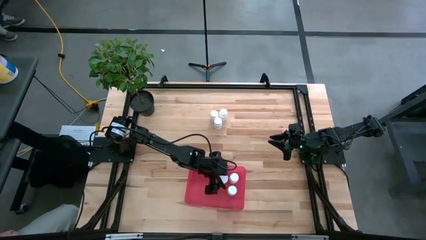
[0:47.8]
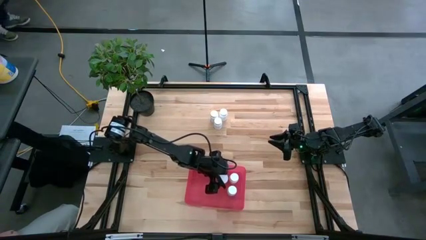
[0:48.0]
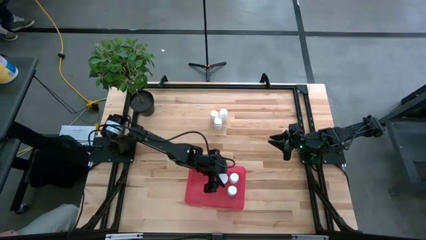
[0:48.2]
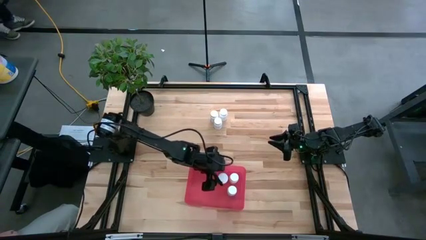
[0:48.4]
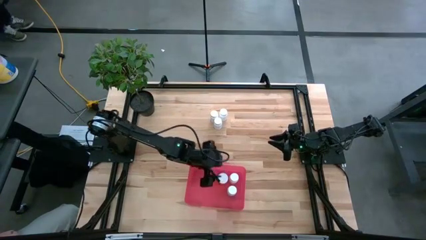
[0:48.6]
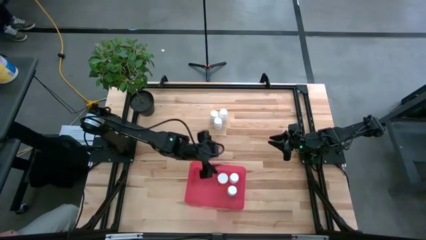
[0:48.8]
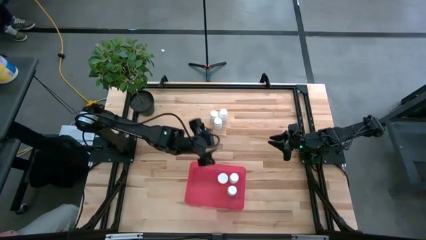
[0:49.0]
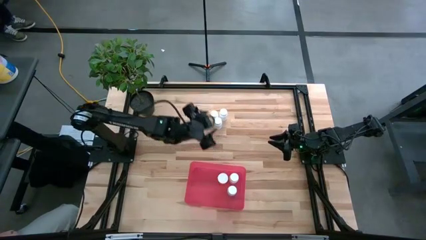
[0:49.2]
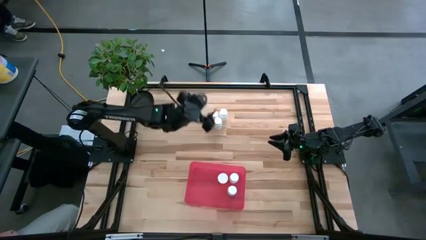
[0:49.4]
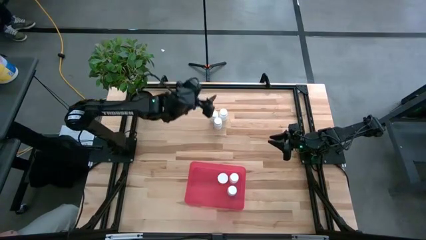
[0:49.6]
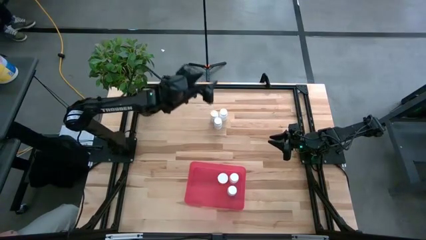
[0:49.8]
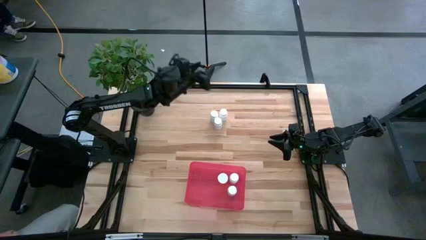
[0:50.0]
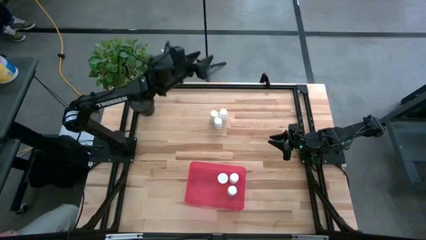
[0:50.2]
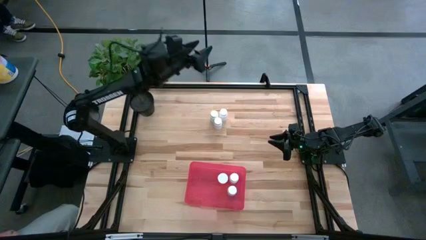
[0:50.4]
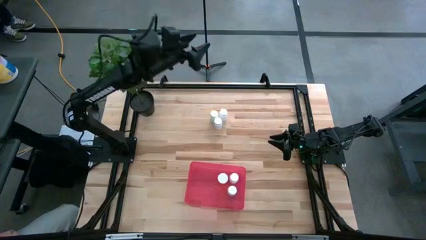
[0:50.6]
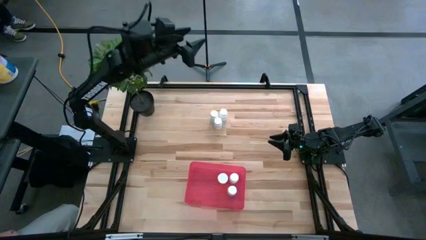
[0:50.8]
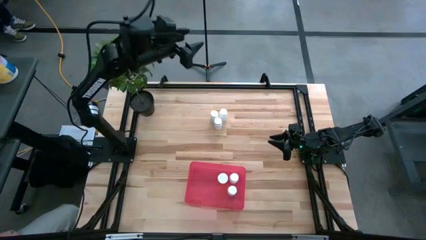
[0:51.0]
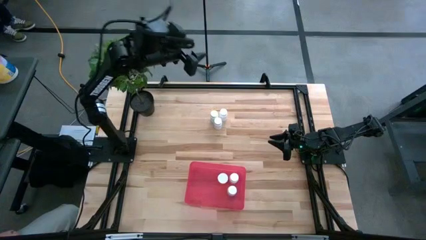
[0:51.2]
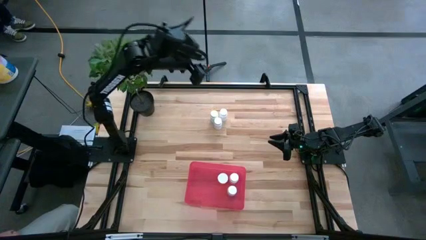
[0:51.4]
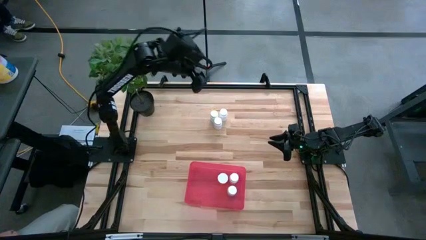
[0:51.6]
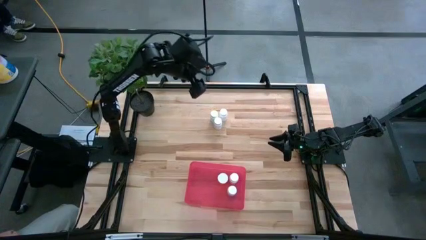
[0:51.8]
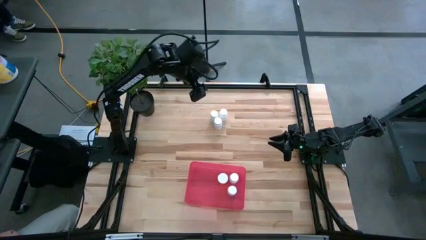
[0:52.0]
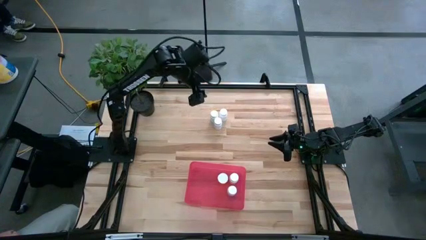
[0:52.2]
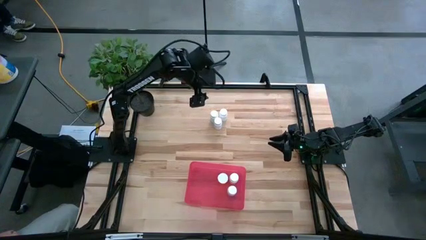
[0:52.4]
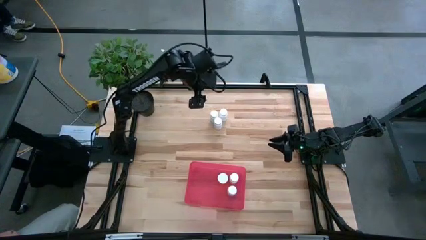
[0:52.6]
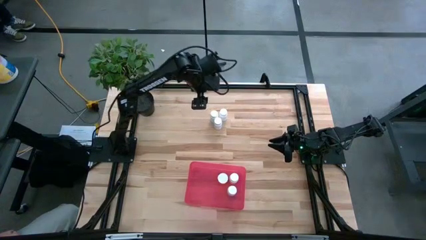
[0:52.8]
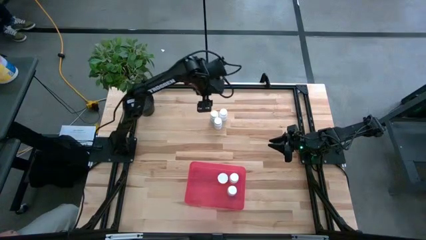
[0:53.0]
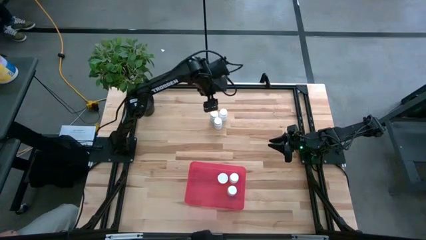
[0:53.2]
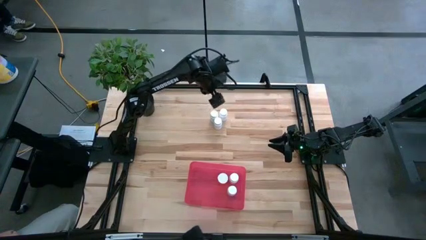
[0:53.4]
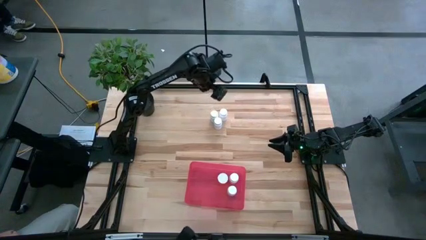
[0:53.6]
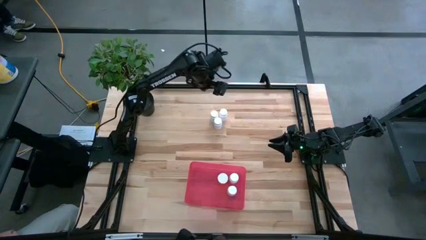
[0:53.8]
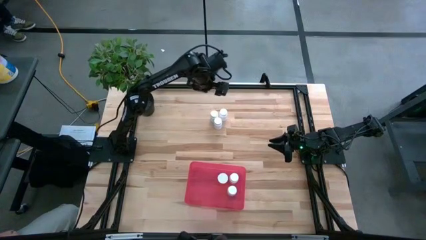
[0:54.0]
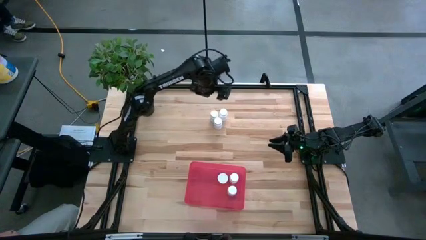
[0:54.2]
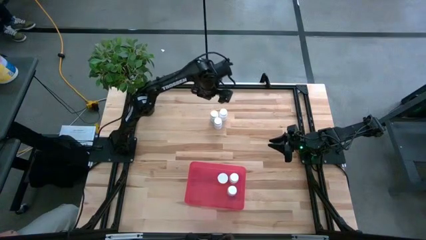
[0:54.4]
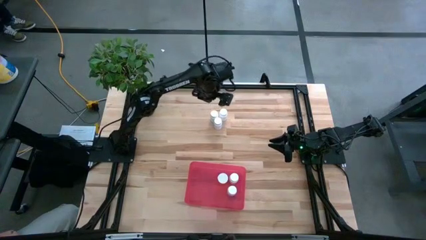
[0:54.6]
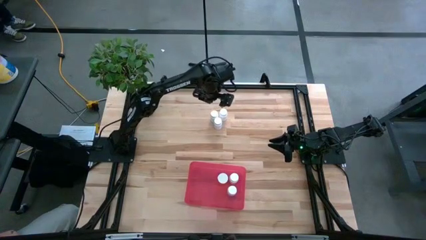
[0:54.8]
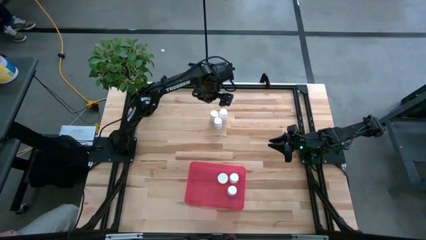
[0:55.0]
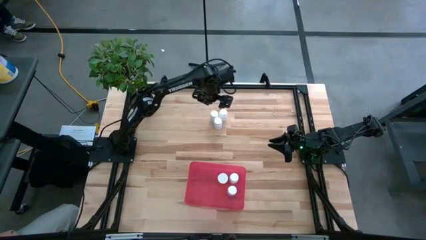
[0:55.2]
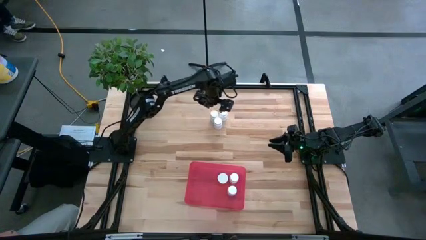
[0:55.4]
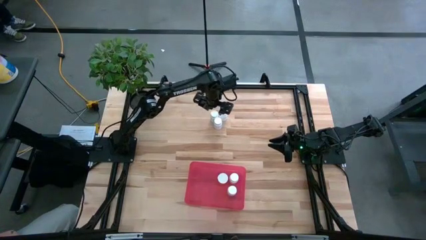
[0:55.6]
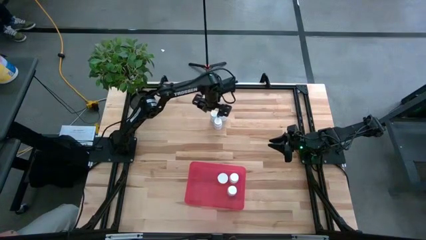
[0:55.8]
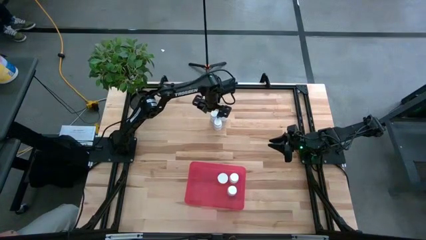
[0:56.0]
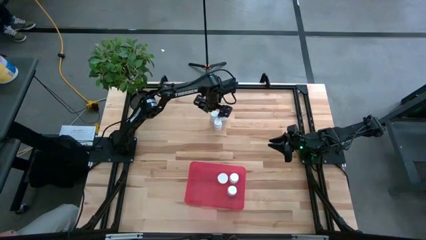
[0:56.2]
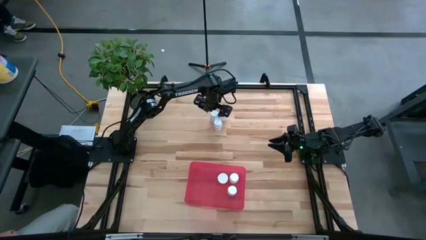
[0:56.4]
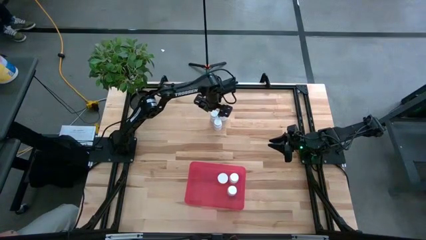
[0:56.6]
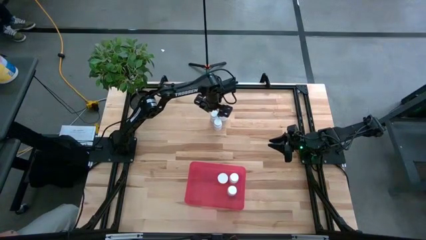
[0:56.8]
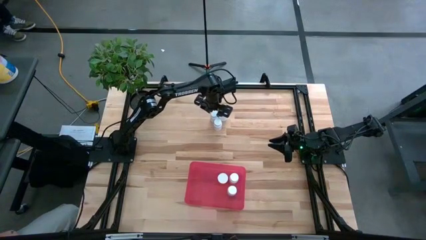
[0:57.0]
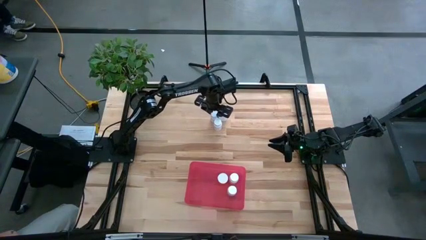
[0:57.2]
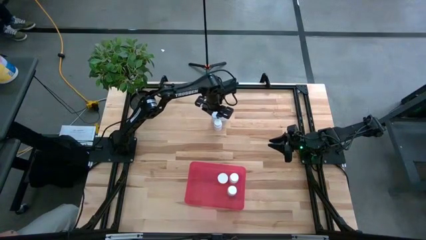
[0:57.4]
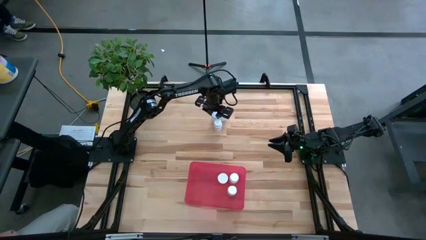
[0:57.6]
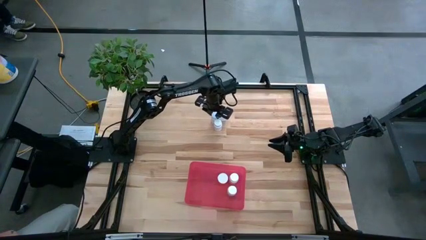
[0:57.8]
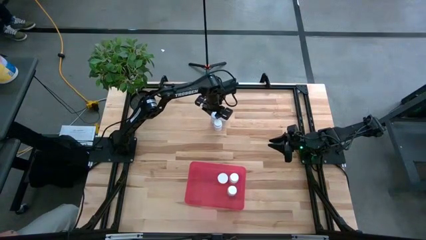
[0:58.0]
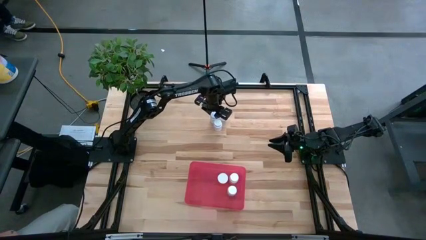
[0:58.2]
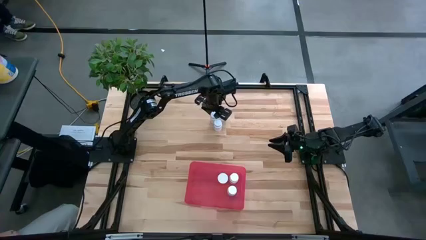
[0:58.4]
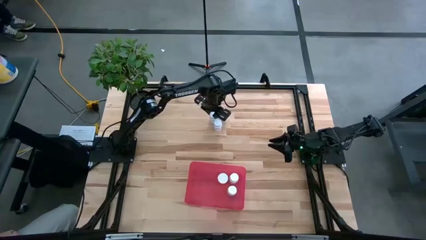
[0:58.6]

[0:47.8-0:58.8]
Task: Pick and place pill bottles into a basket
Put the white pill bottle into the red bin
